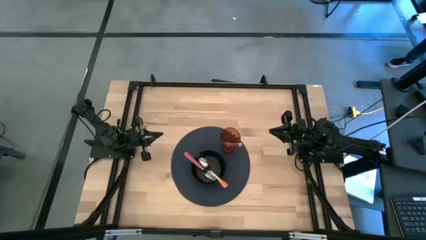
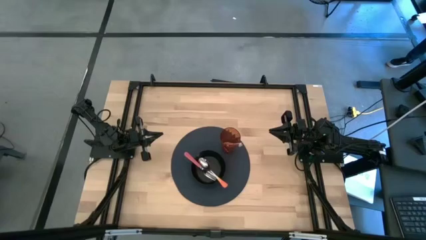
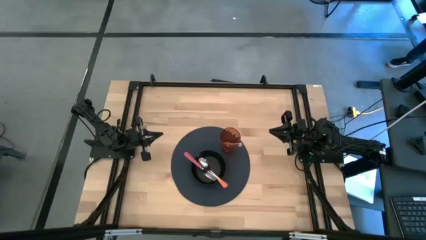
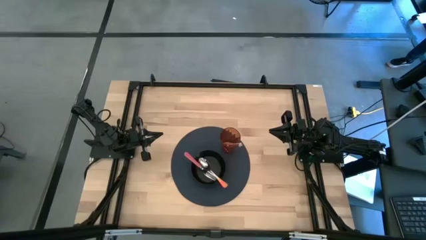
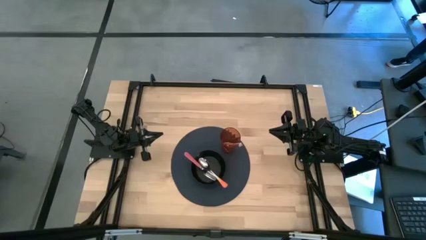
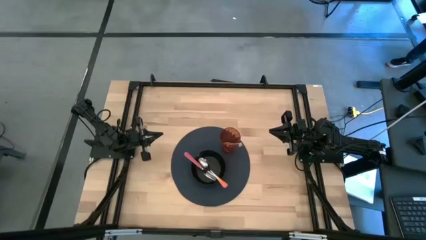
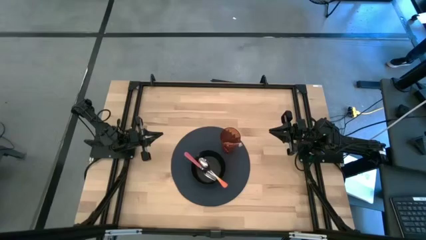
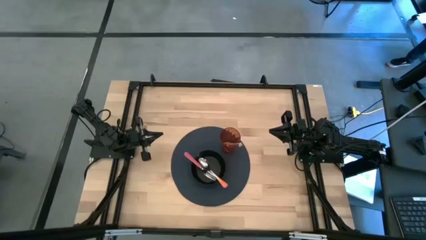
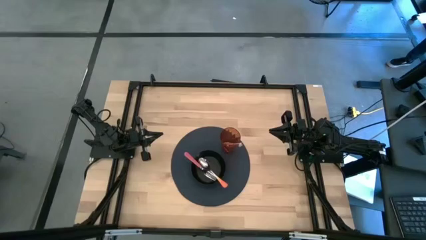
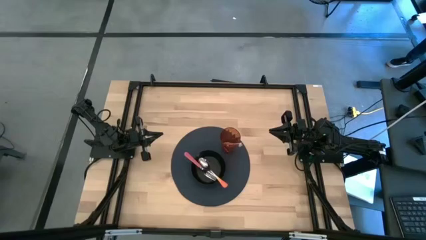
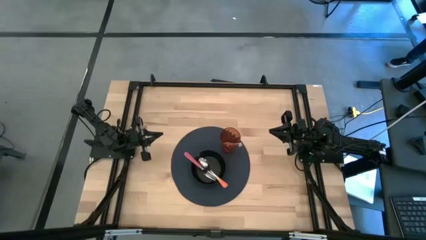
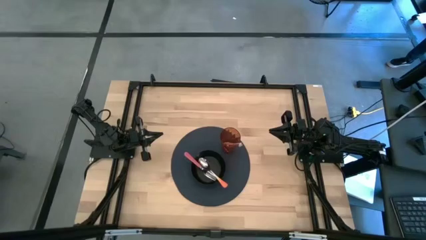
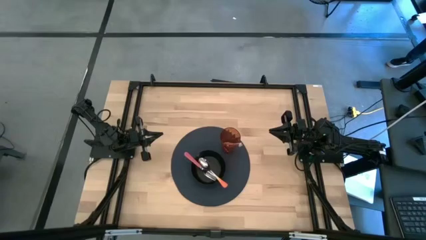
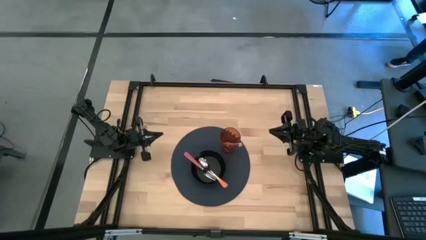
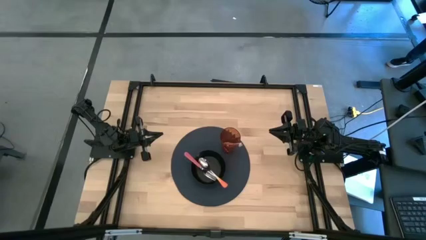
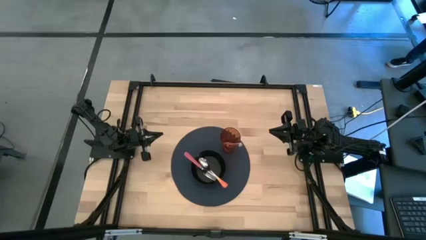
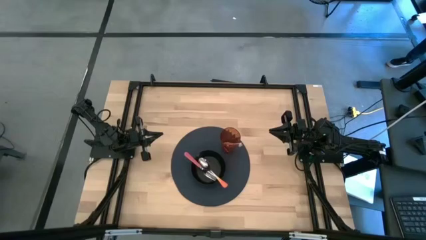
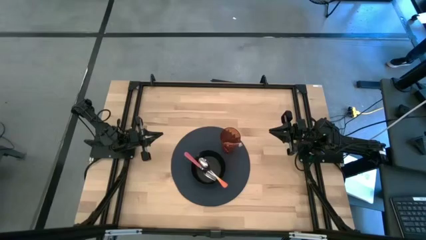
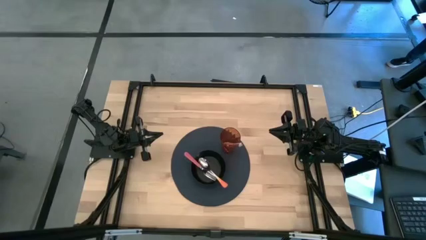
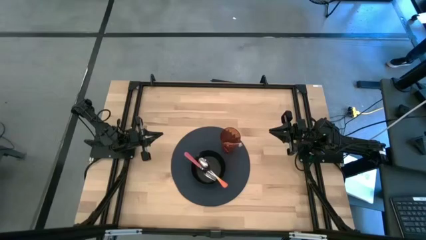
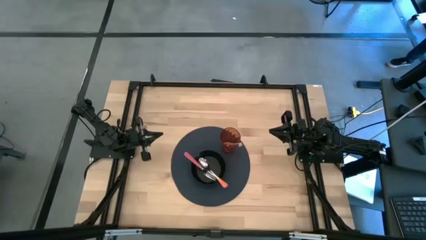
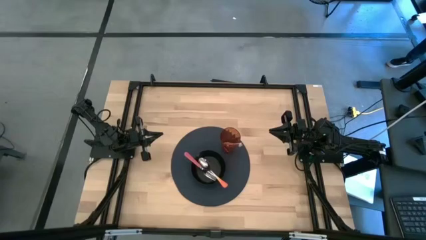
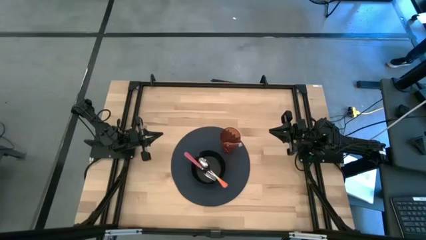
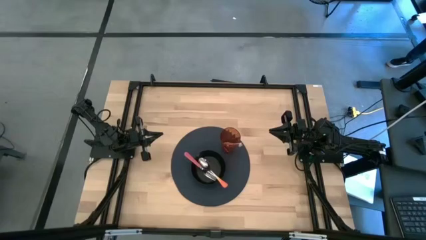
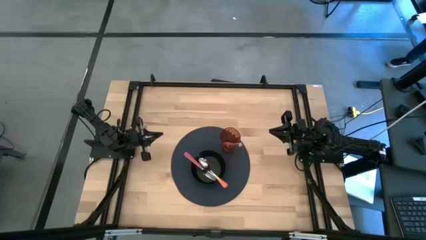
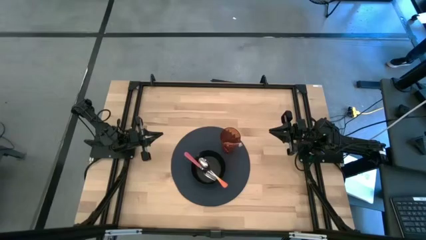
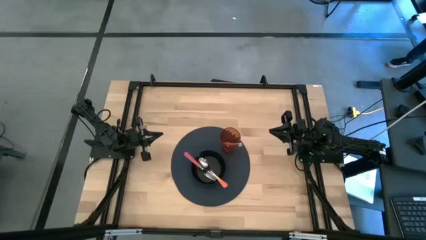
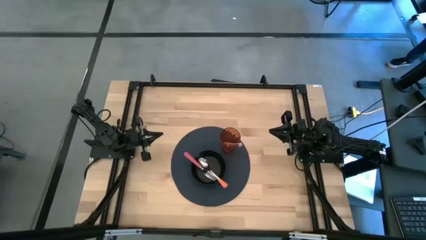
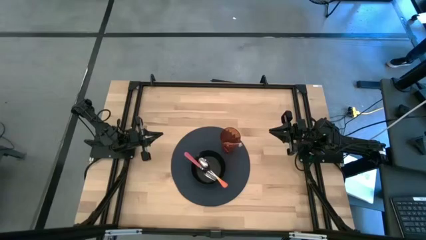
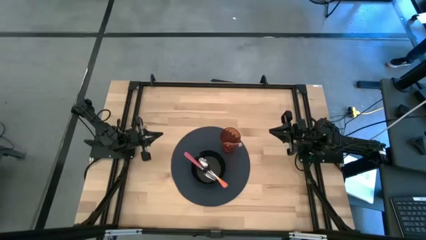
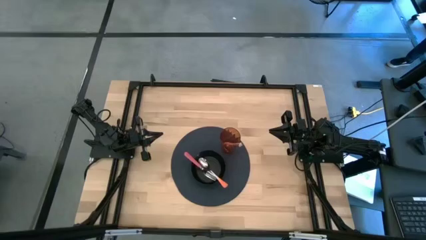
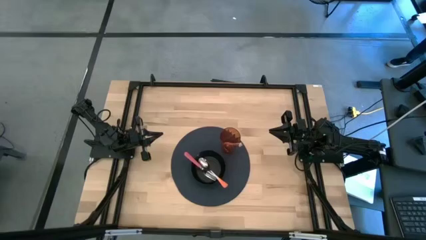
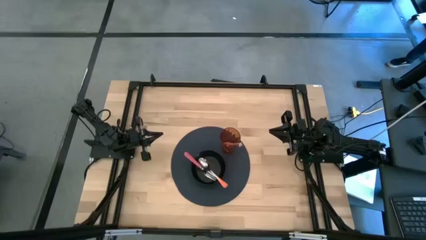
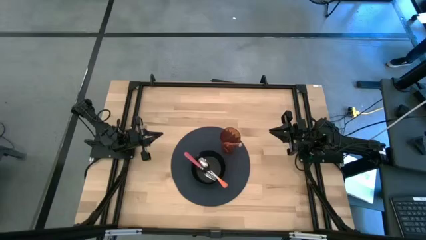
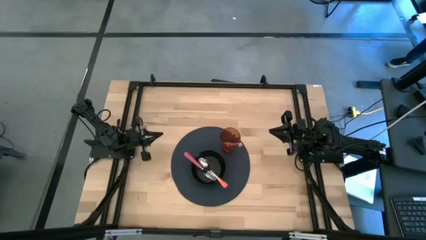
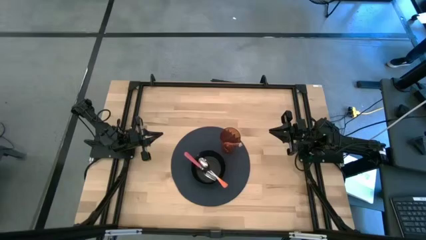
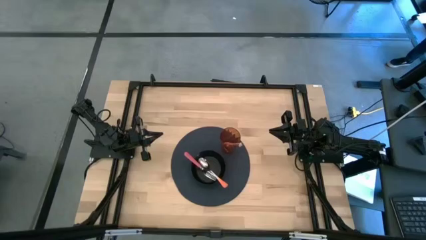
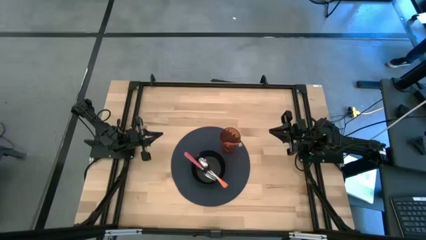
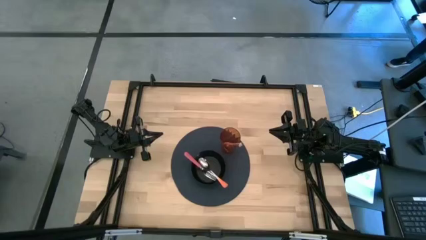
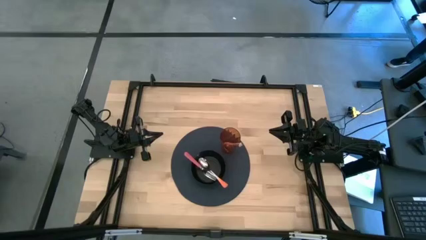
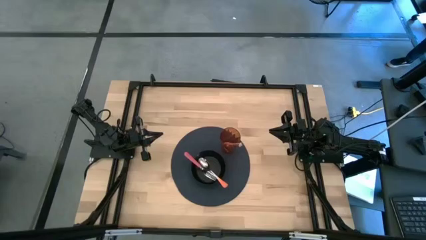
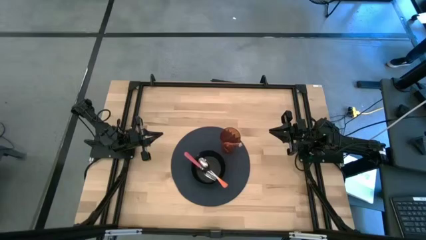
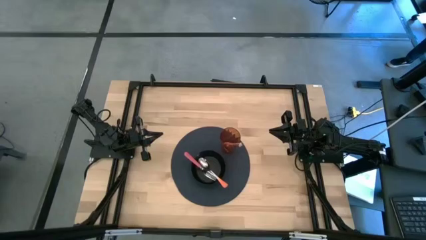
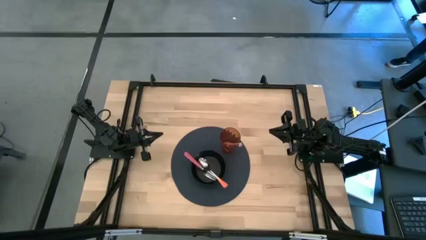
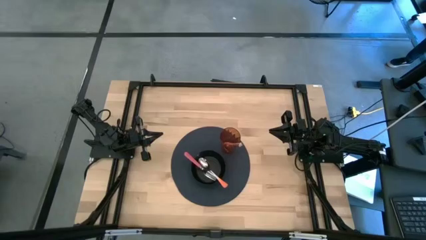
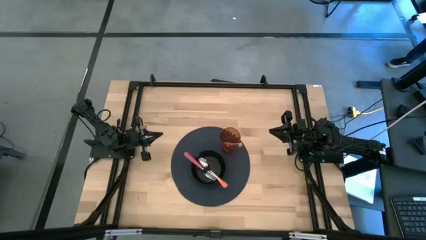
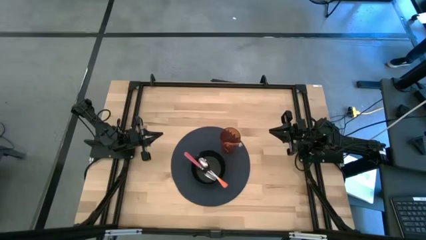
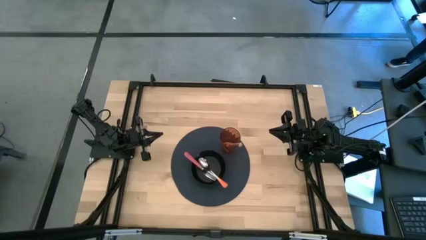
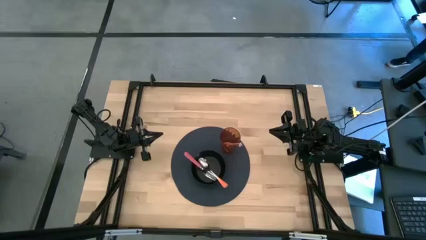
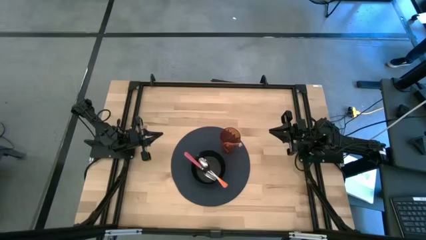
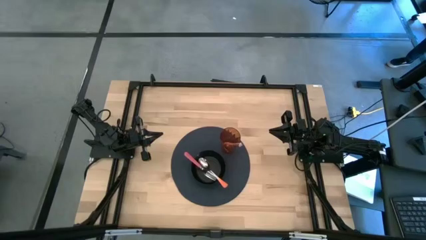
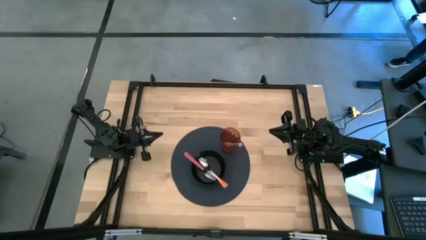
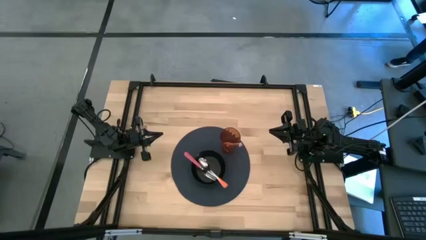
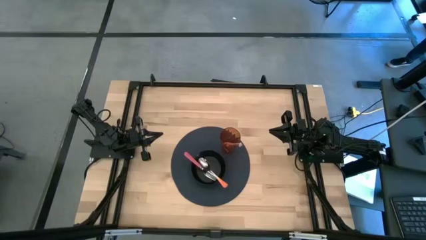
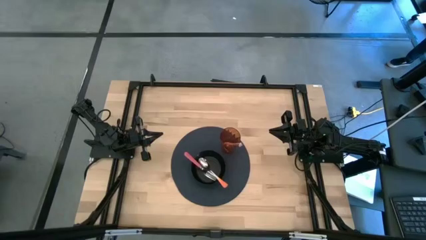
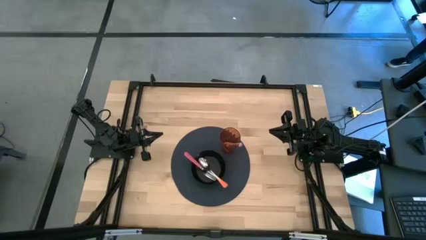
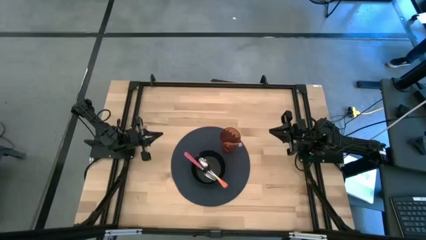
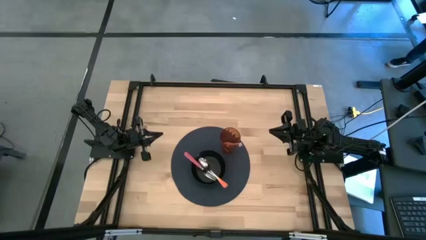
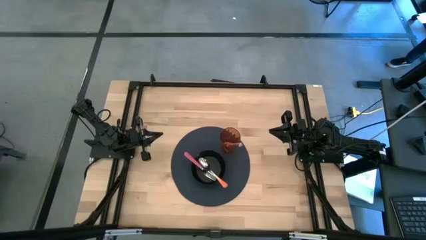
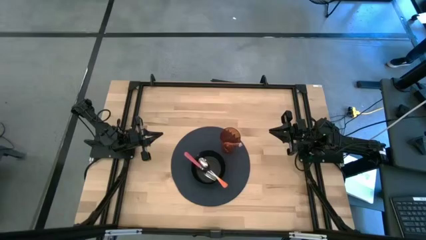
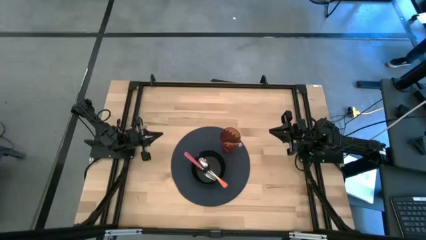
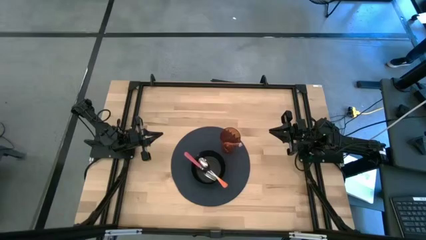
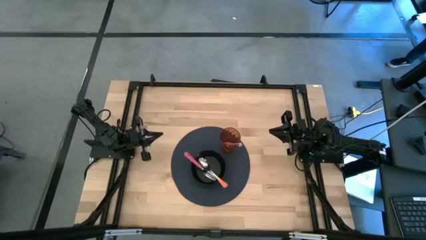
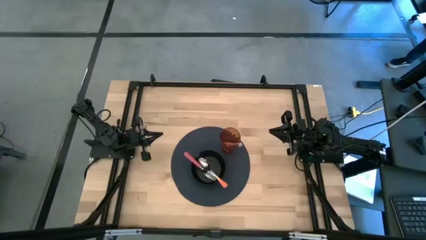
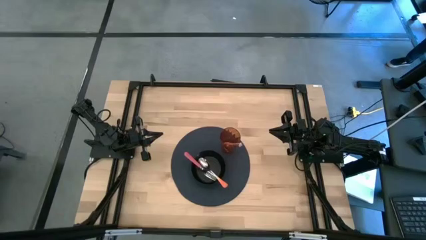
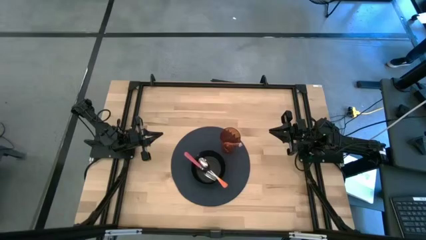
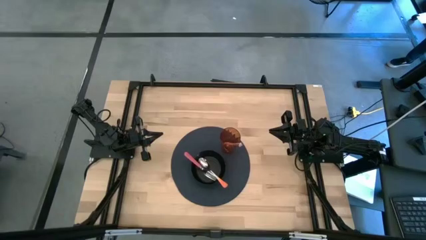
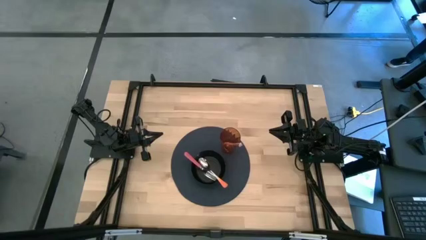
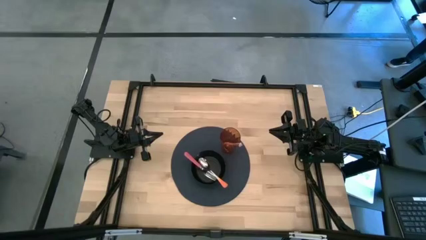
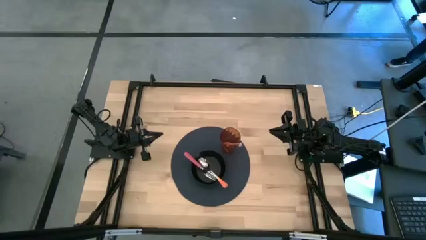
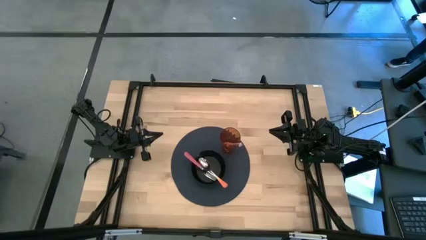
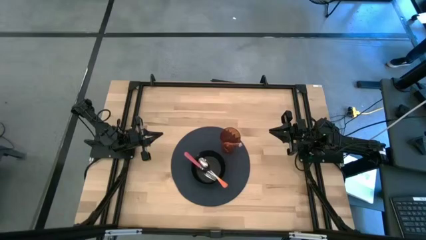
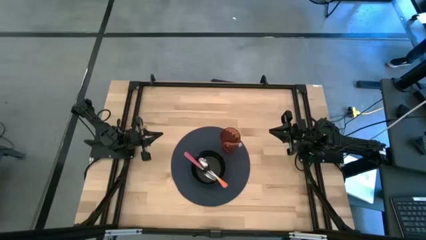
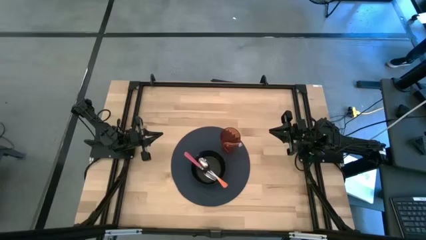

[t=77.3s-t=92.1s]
Task: Pick & Place Utensil
Return to Home Position

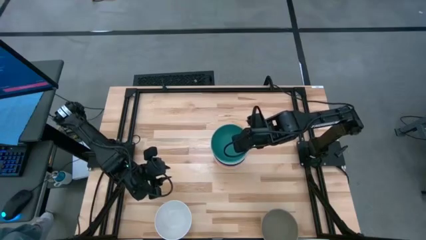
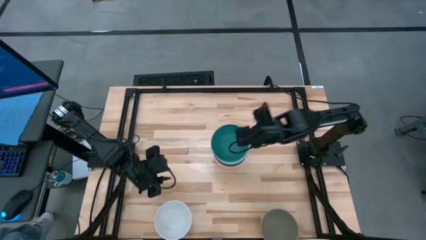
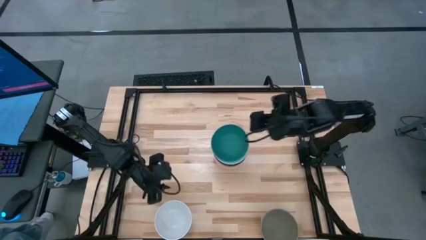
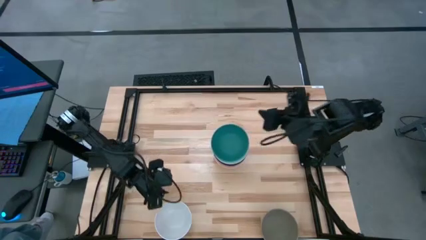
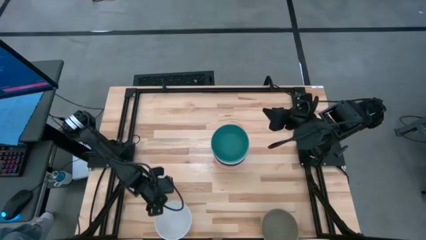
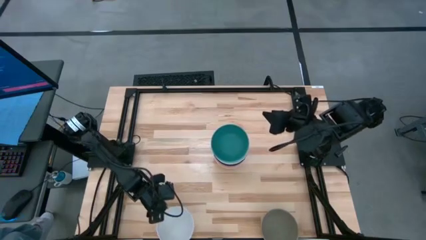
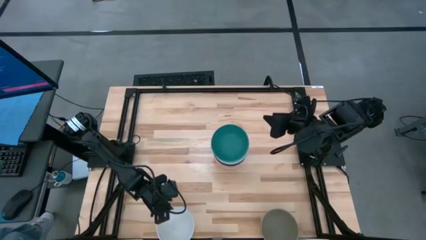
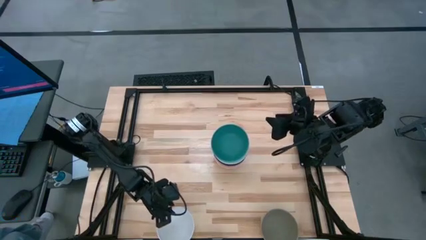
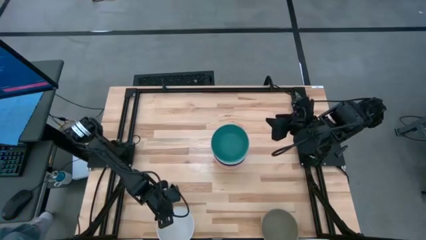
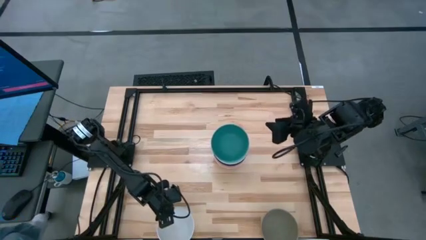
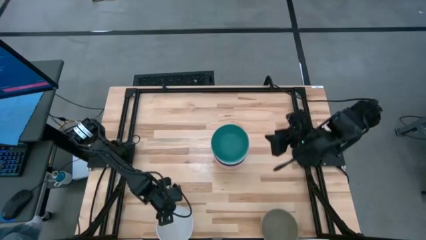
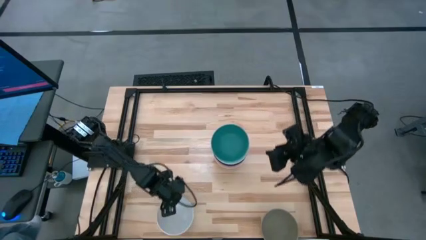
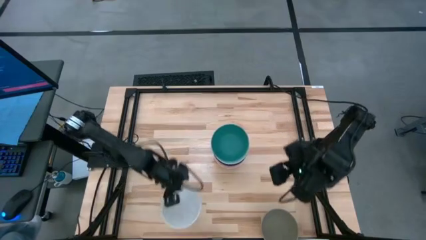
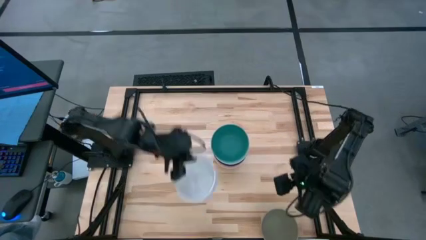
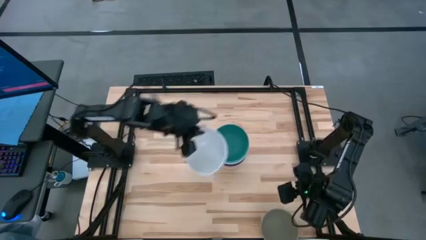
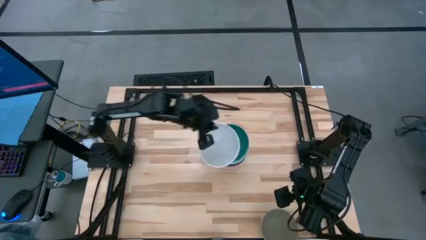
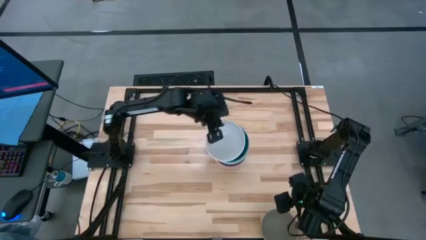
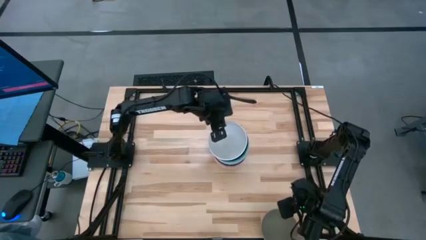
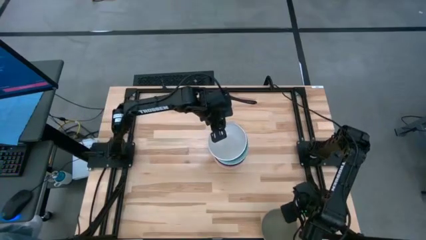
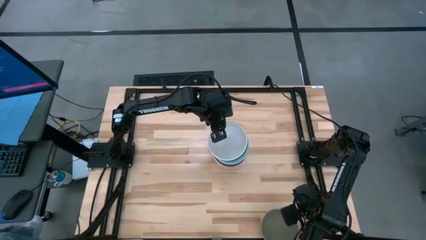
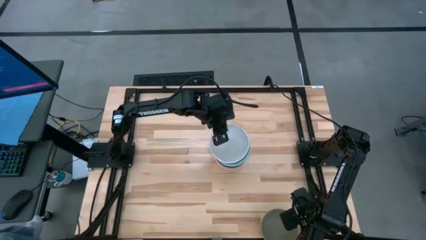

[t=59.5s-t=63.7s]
Task: Nest bowls inside each other
Stack the white bowl on the green bowl
